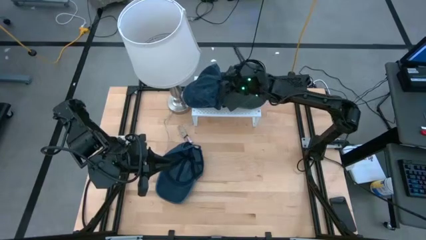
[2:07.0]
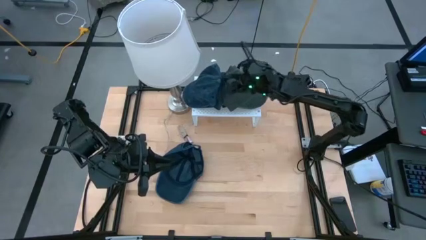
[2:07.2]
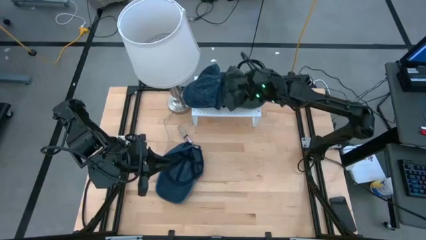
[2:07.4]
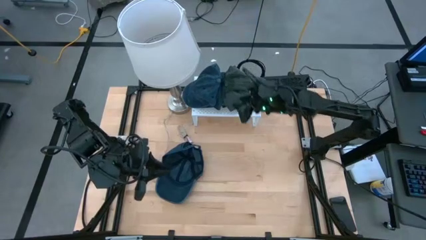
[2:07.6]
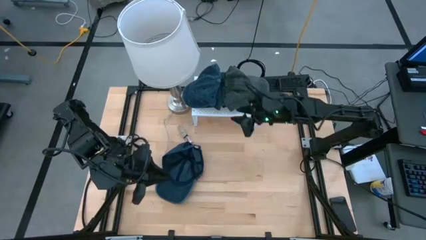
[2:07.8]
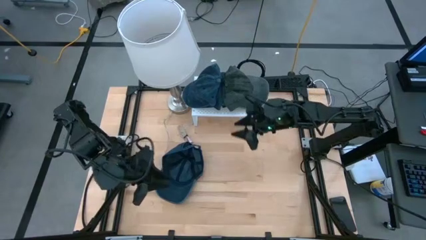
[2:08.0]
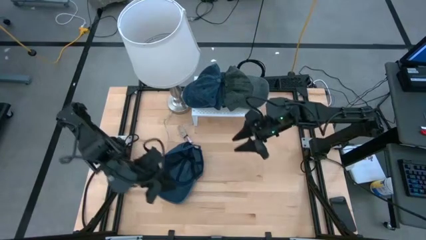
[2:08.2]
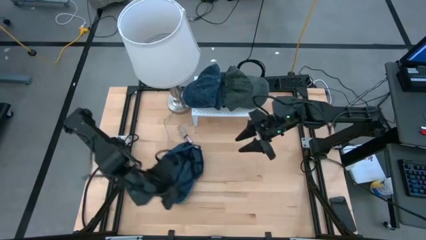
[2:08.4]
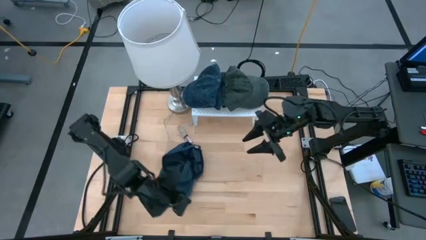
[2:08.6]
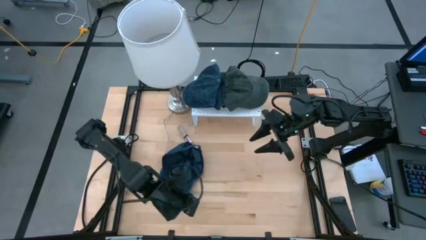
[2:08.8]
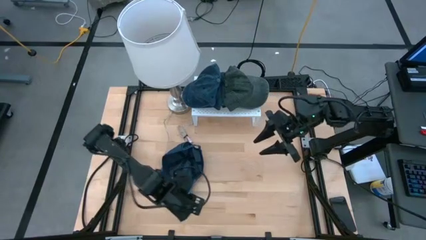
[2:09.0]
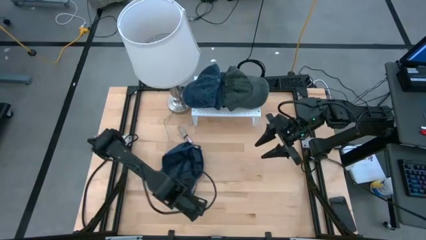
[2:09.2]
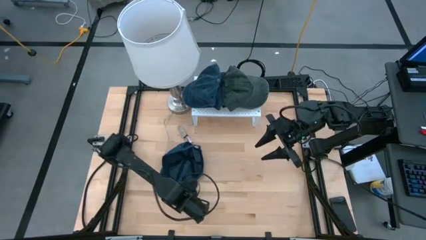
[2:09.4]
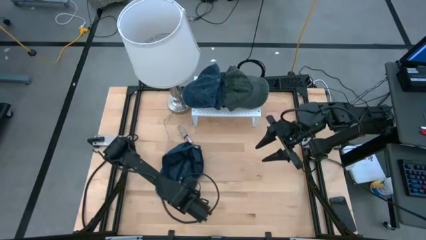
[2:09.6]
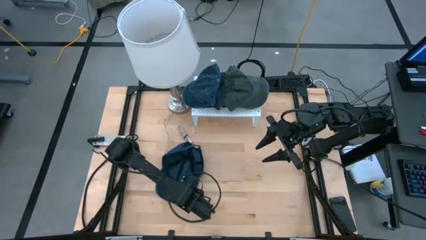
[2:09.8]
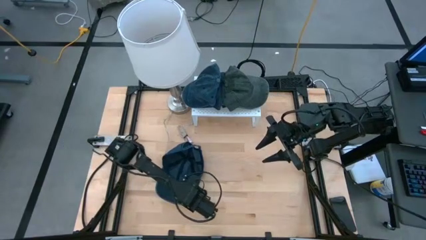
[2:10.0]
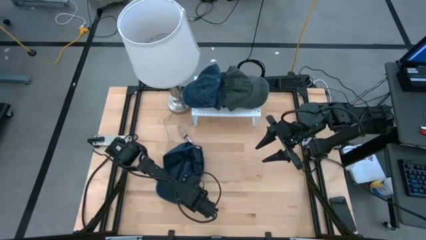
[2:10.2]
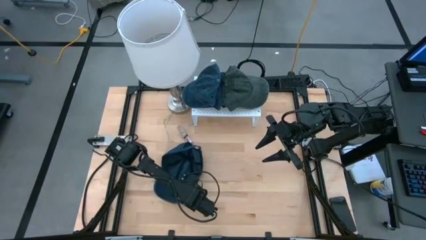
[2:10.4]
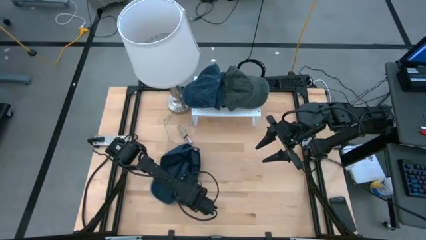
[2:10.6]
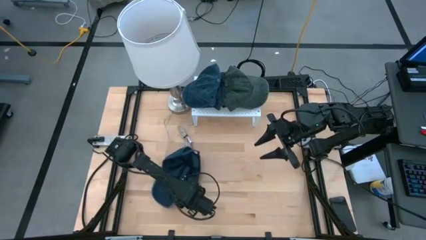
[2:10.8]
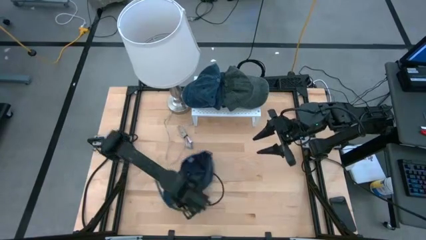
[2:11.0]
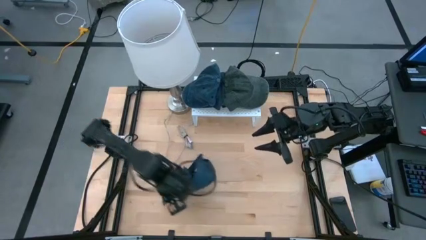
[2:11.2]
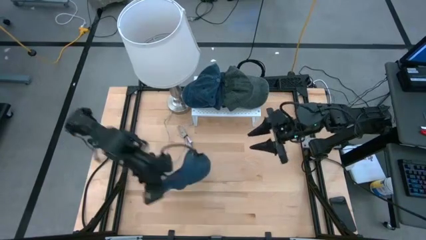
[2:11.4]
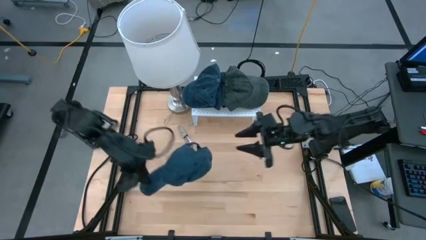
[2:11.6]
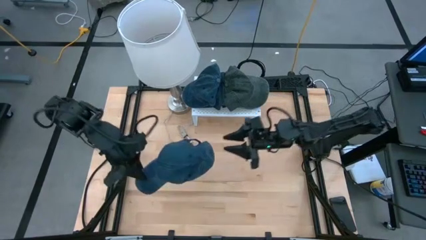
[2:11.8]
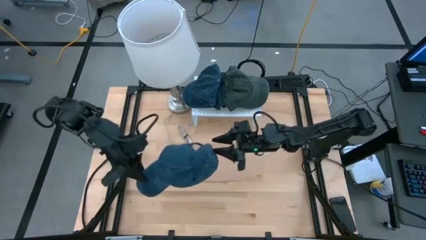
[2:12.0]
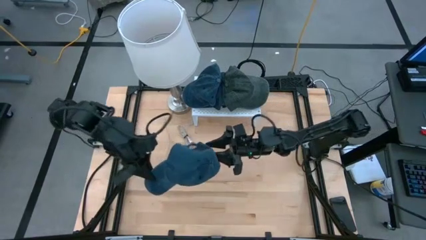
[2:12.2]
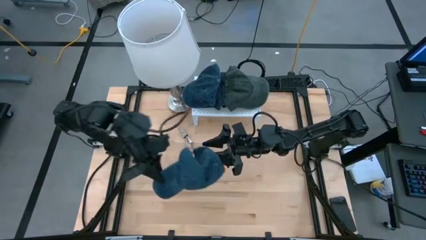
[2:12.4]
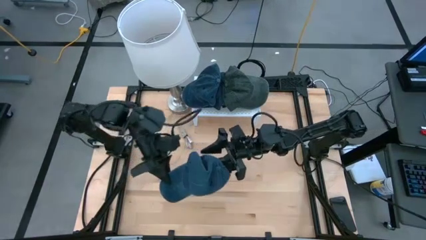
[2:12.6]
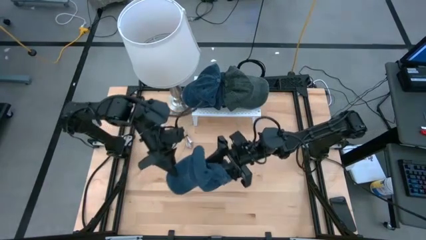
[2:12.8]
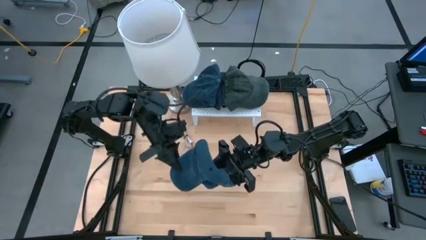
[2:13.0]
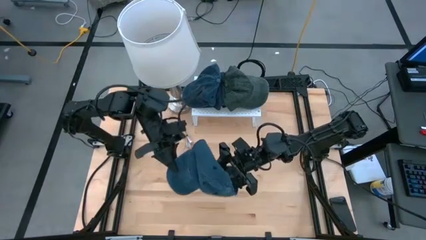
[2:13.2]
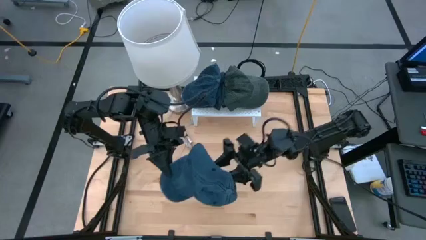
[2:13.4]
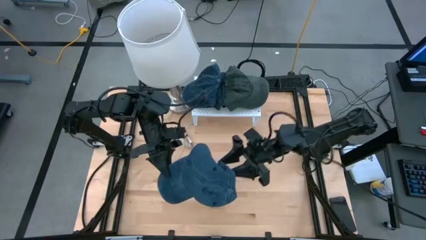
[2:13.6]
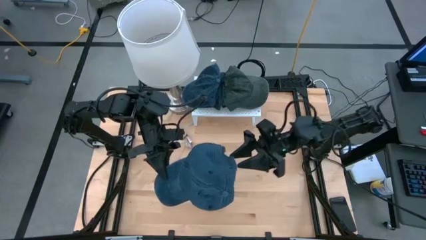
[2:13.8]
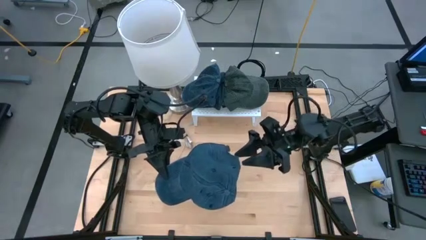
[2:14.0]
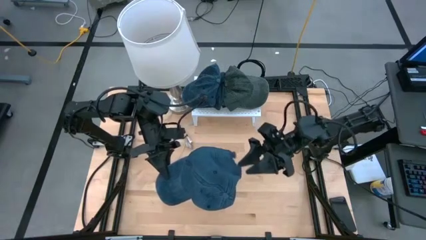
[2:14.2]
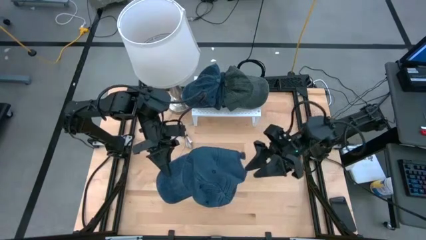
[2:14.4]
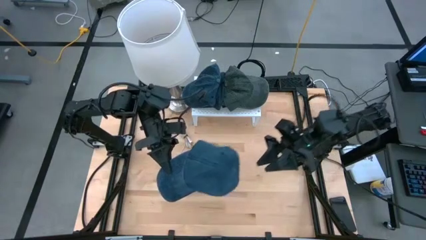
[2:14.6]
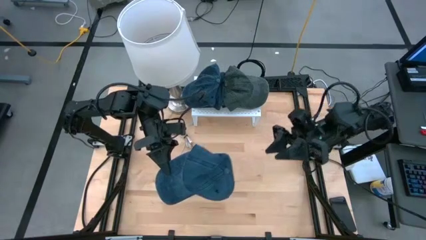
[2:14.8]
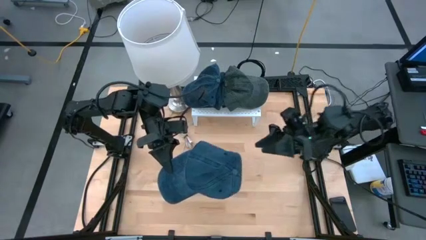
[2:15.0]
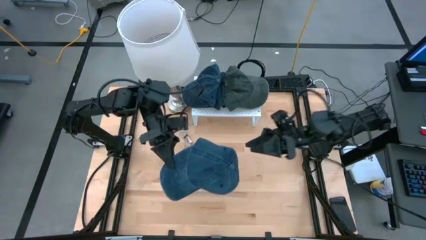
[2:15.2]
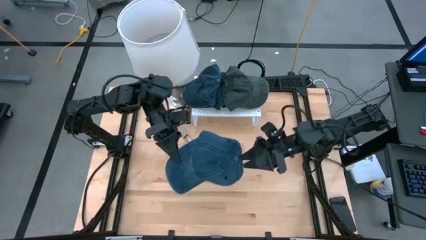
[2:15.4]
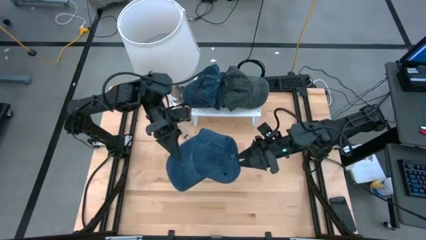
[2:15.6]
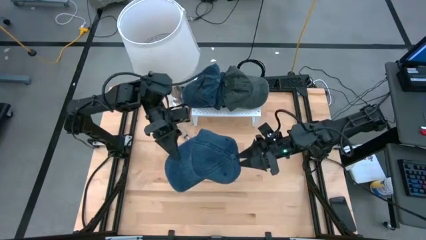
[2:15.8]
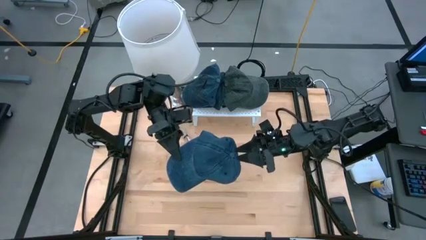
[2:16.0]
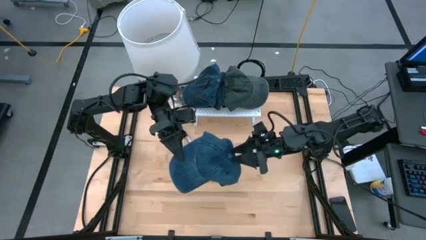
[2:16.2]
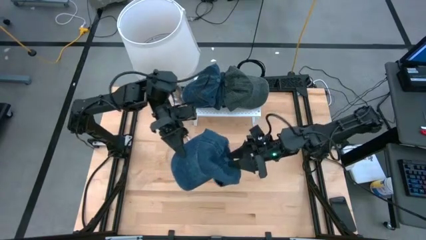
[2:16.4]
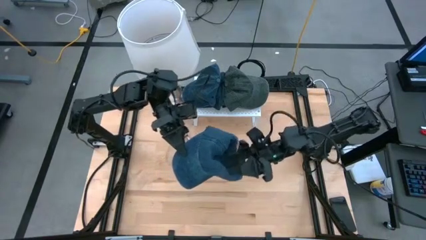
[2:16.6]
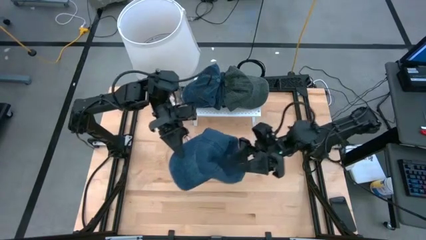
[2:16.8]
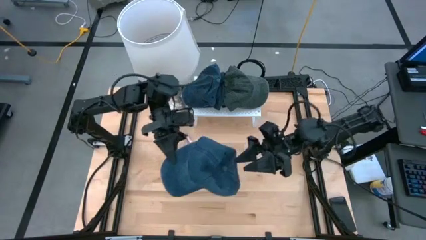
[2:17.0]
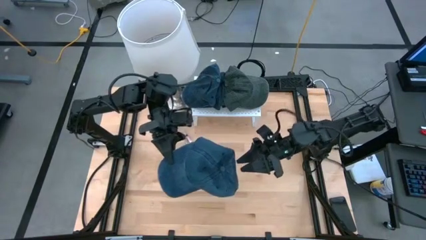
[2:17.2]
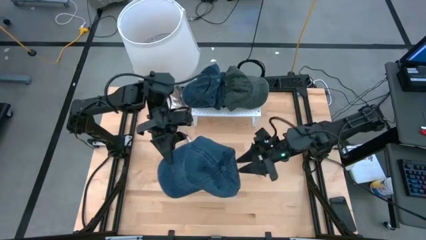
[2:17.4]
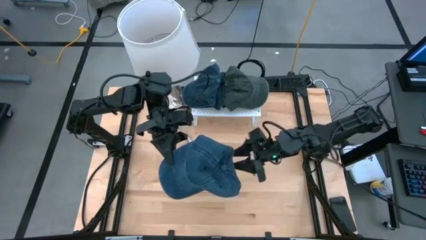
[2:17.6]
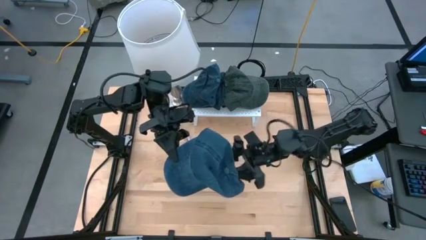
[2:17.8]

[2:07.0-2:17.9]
Task: Pick & Place hat
Stack the blue cap on the blue caps on the shelf

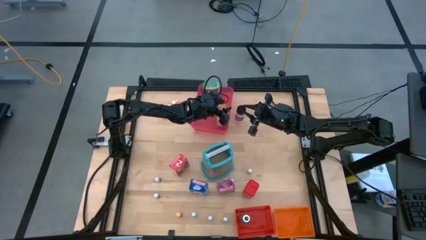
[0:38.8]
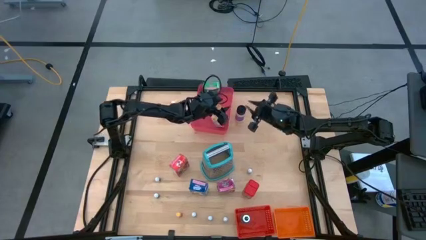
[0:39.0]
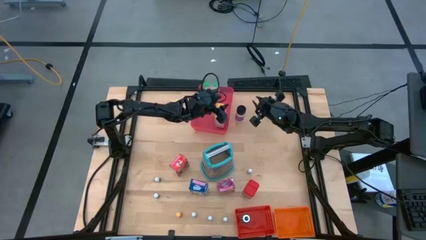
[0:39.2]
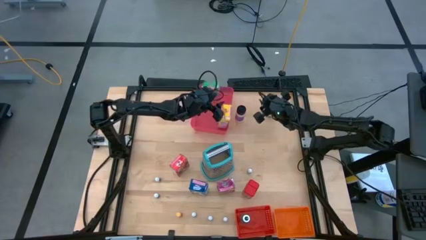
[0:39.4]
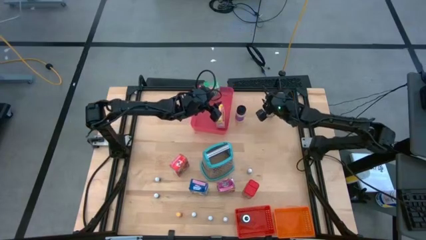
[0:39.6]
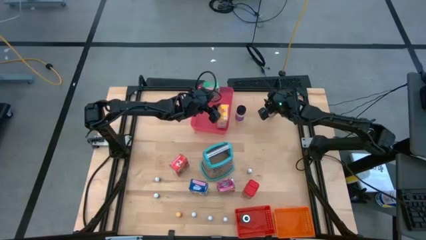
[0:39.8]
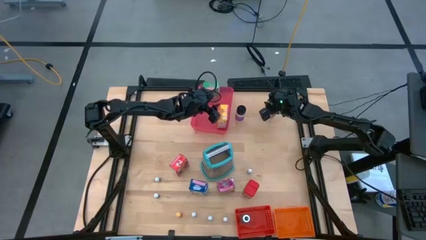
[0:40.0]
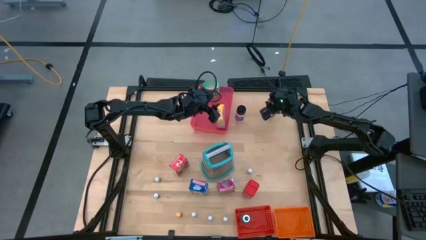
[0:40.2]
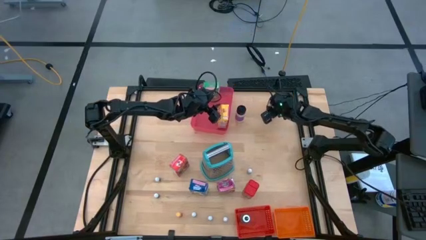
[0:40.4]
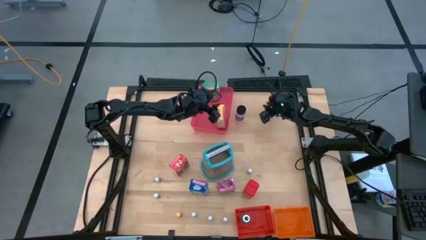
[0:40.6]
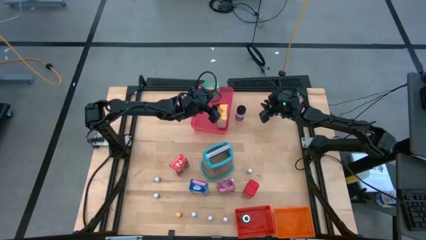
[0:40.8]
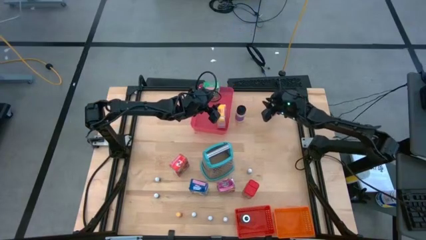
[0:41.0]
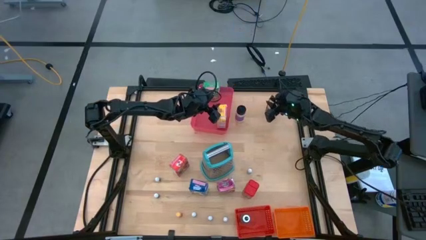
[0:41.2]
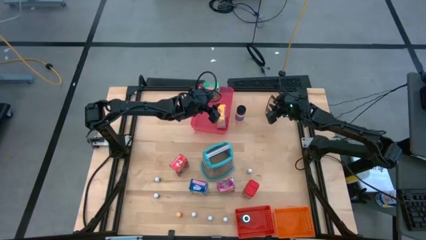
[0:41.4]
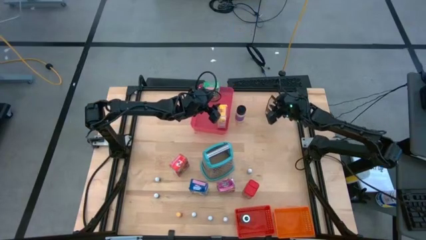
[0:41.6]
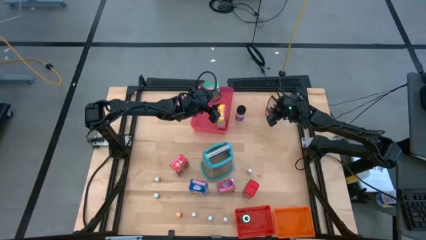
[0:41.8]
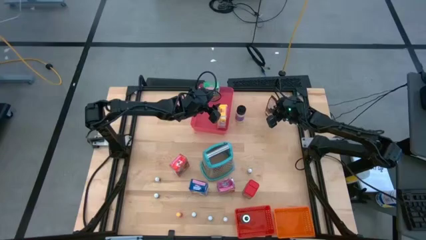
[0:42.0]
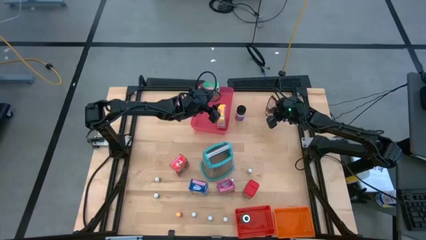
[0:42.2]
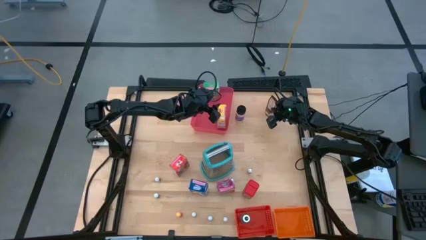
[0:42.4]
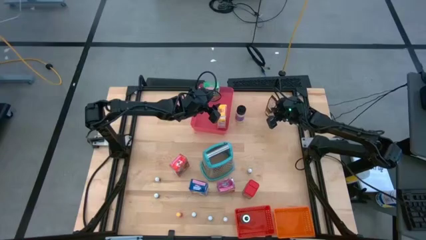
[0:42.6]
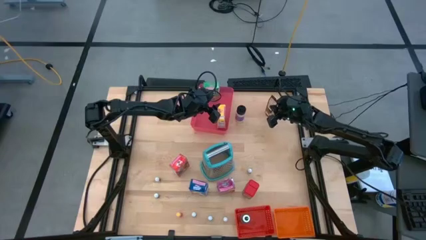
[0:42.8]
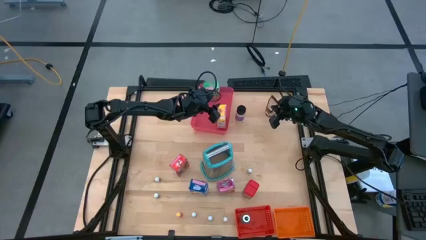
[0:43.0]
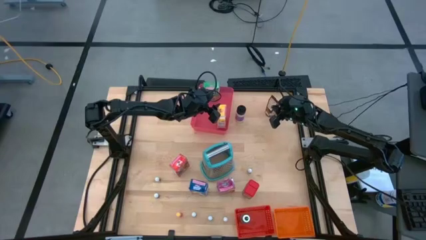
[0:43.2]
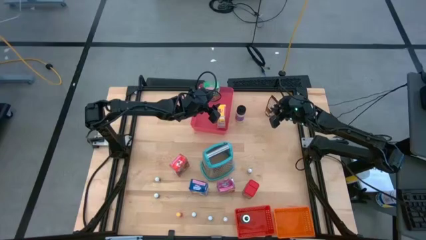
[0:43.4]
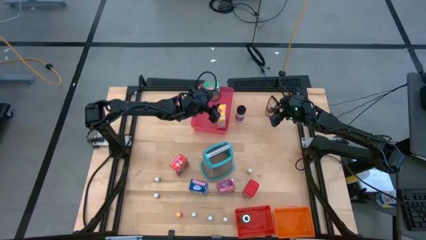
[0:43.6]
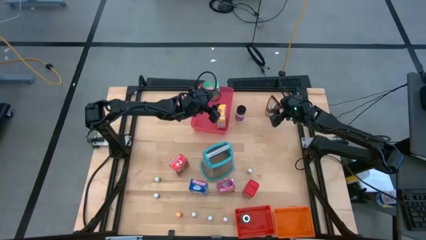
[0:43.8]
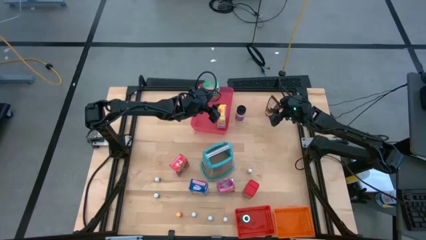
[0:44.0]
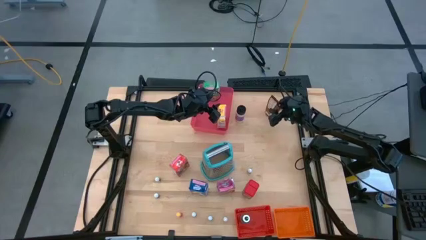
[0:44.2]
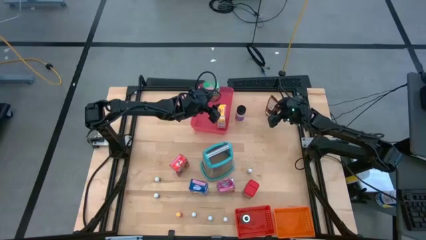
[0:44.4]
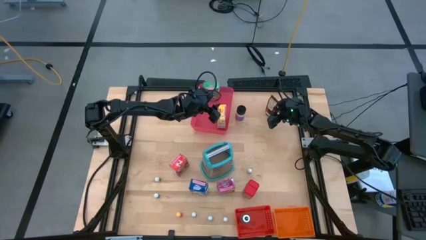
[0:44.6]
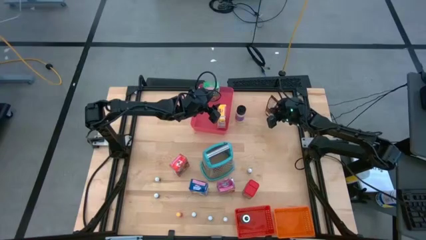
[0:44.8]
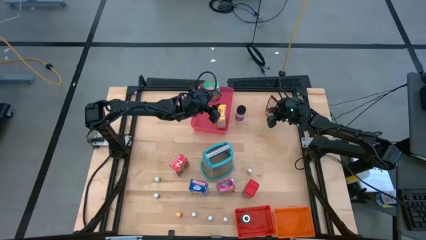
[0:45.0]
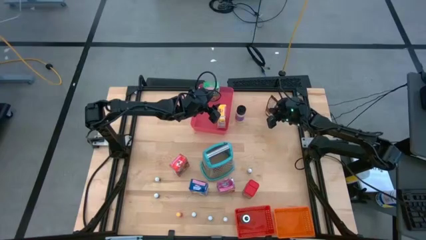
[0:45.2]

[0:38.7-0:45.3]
Task: Pick & Place Kitchen Items
Put the orange seasoning pack into the orange bin
